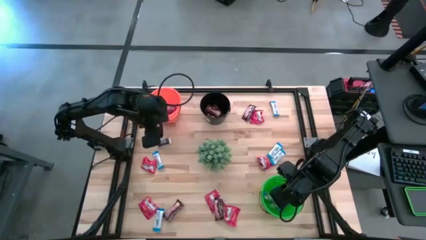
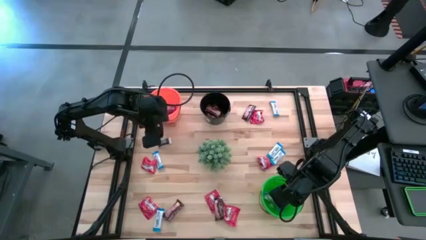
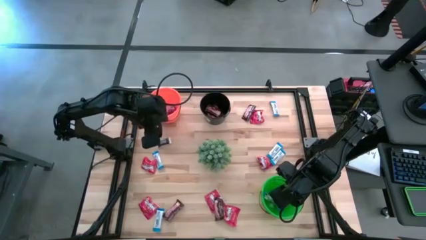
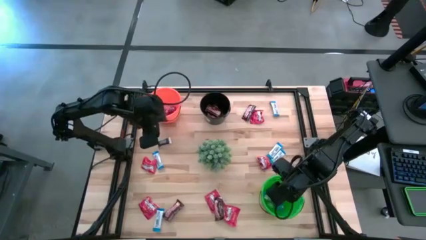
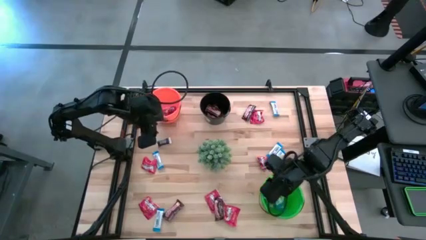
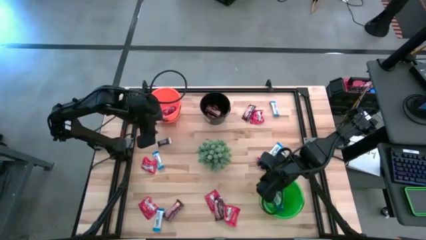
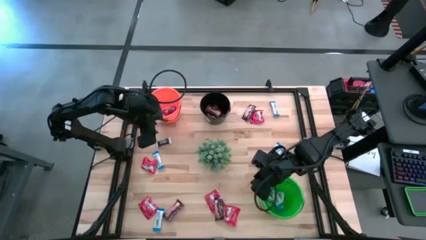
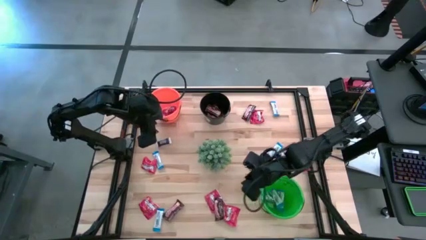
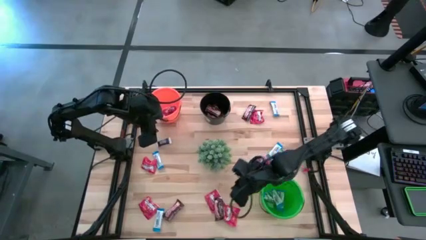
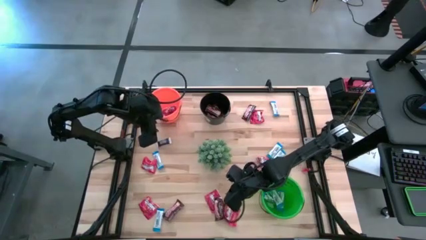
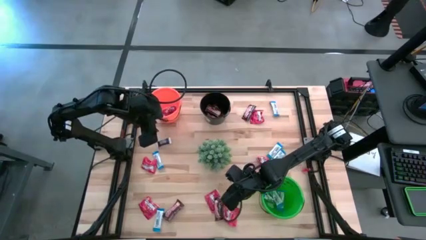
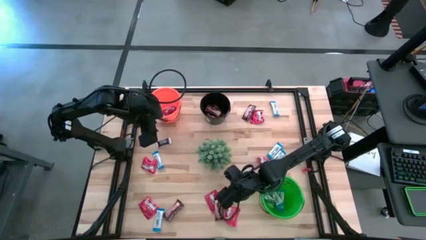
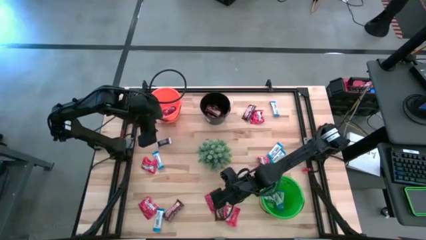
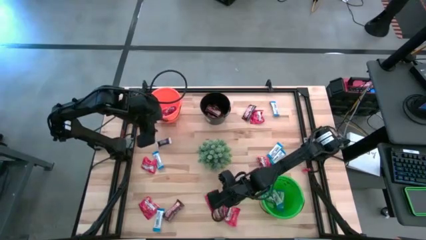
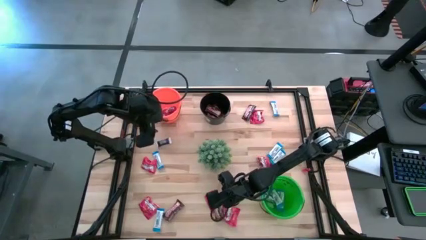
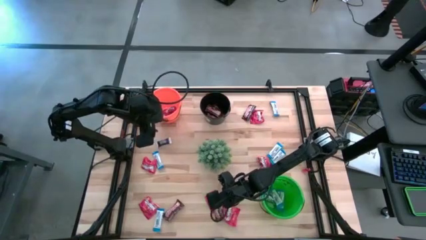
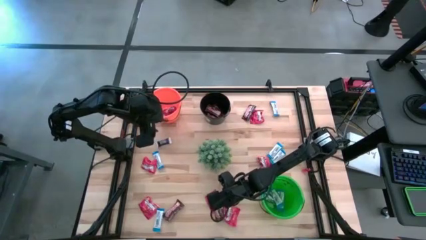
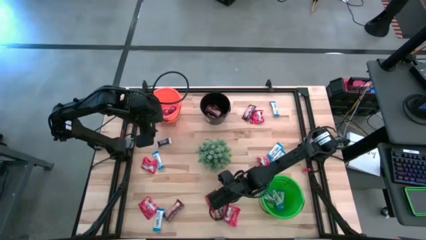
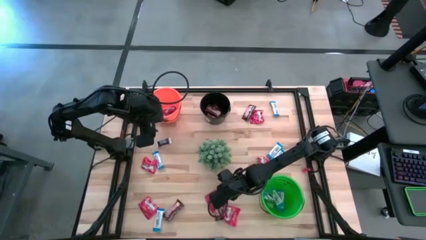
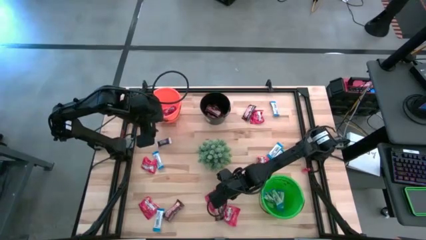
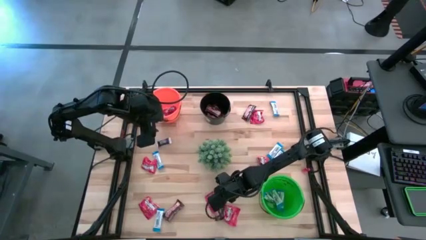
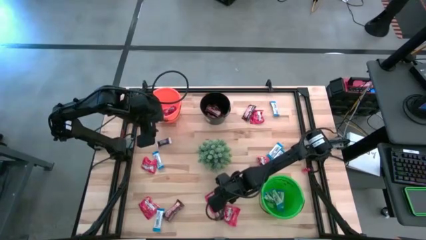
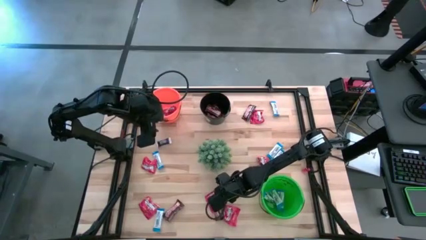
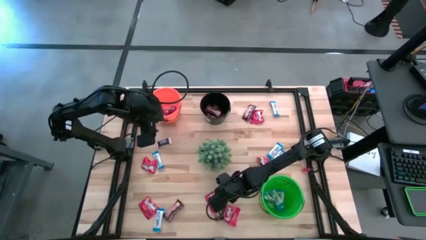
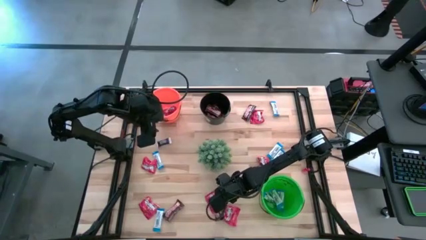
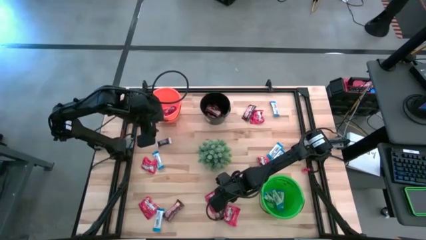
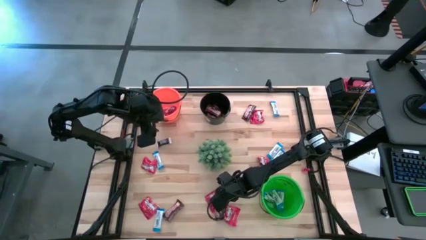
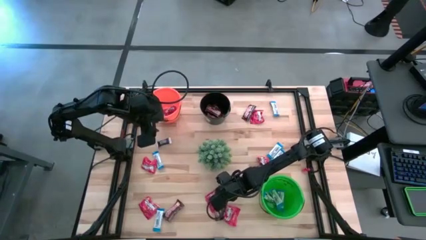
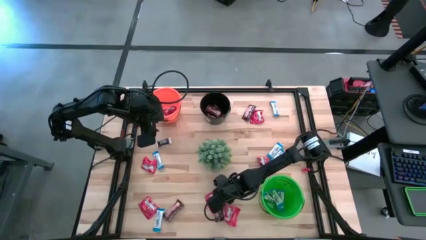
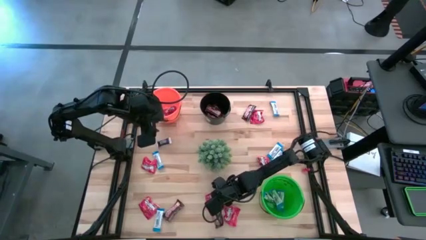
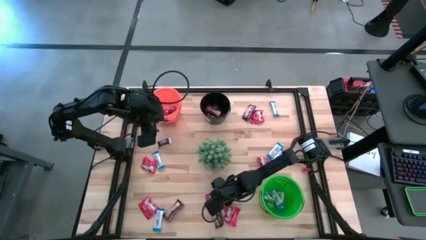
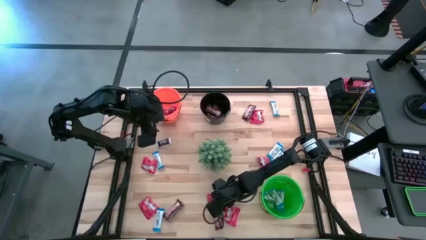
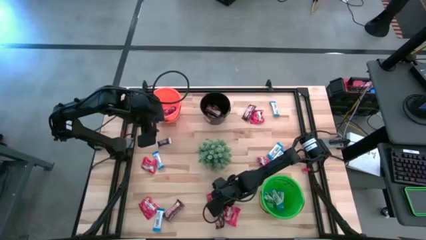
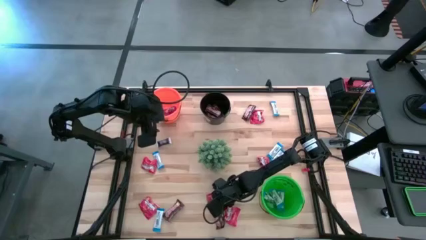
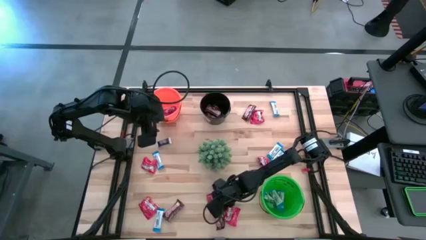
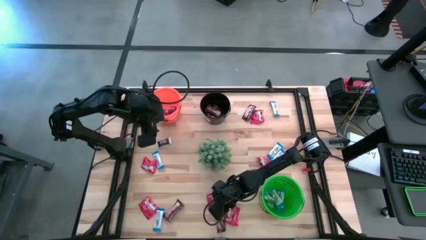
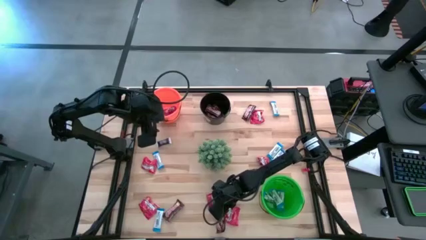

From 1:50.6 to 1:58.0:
Task: Sort candy
Put the brown chocolate into the black bucket

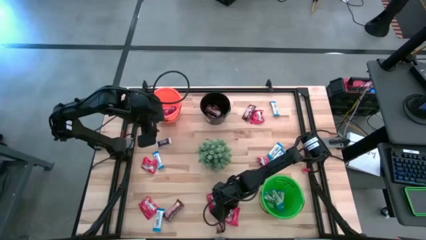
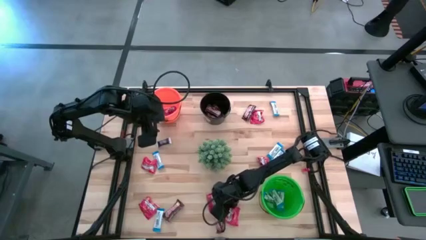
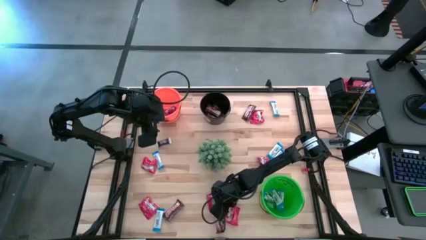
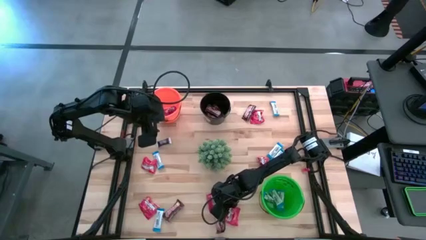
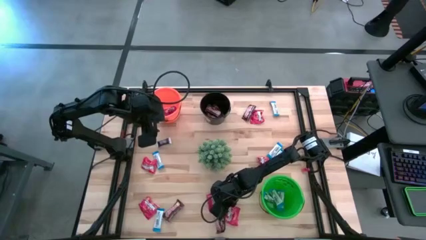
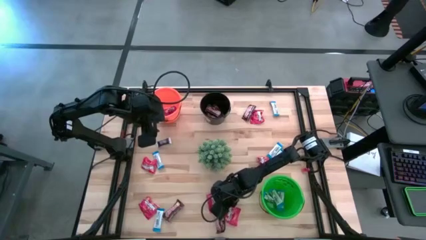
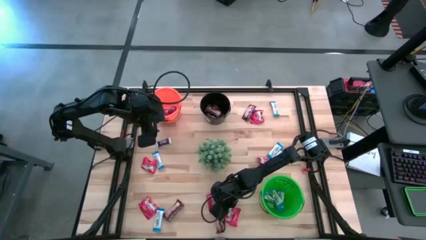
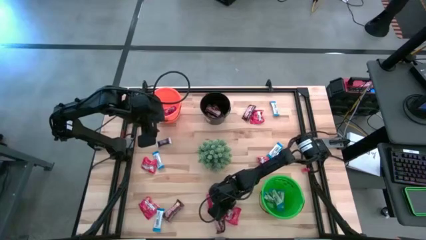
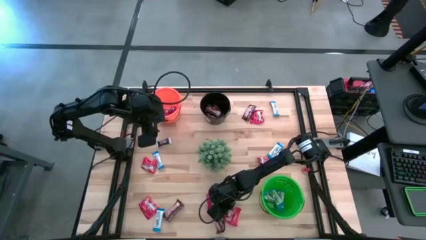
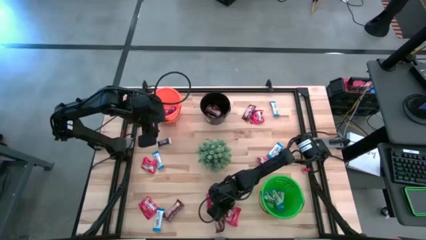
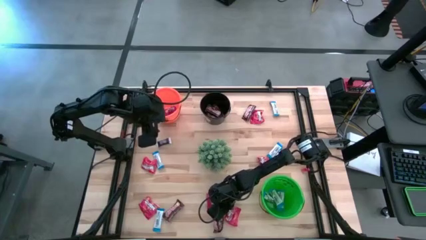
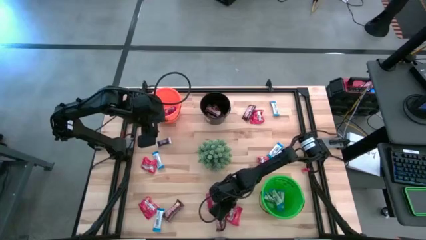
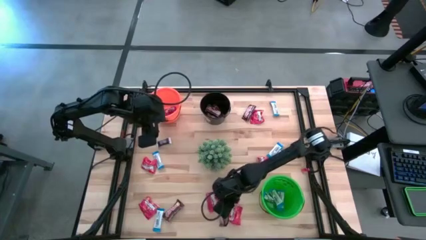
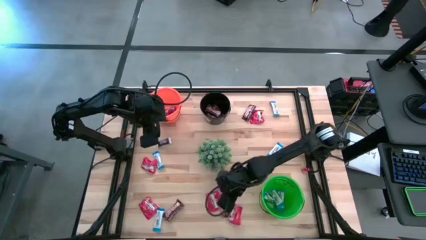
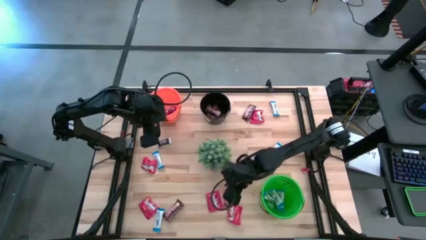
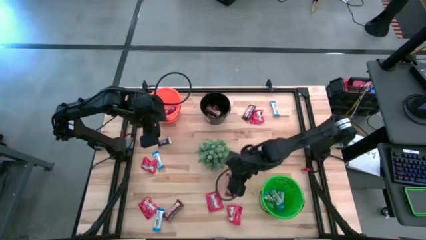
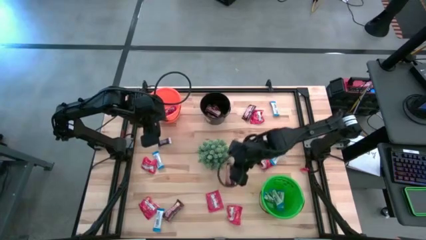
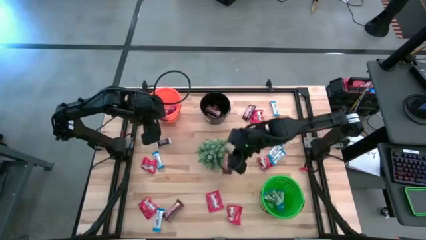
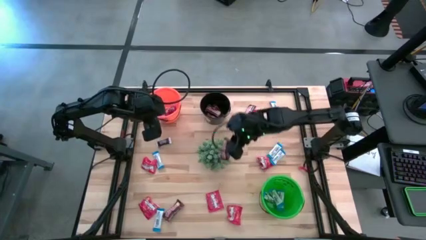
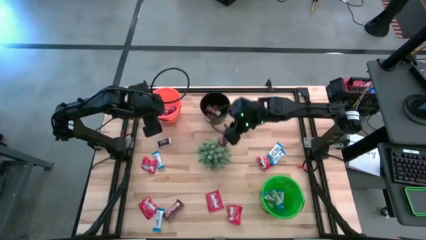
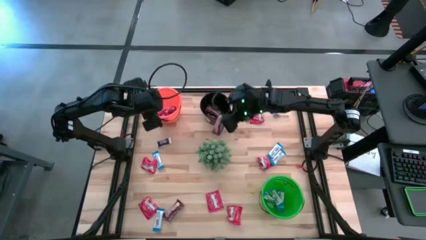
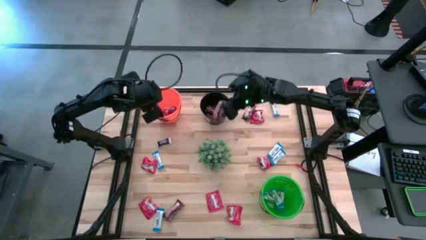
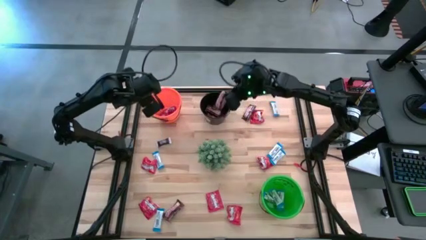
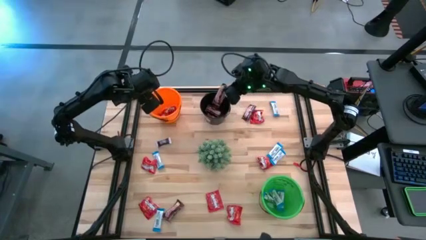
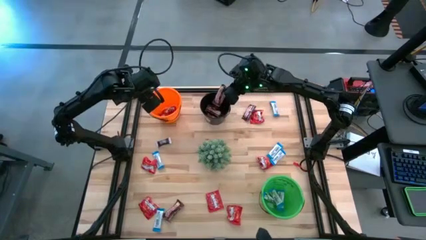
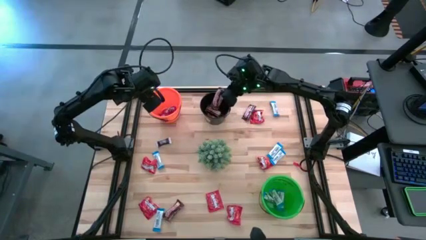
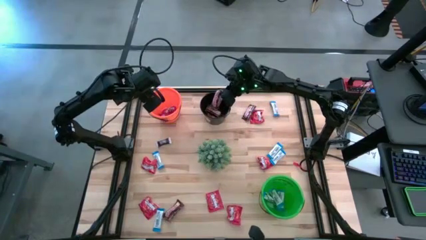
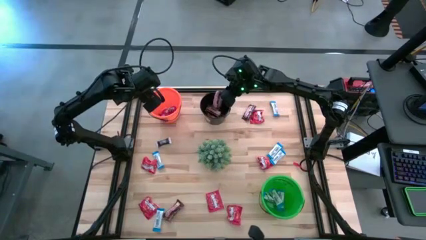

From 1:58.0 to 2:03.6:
Put the brown chocolate into the black bucket

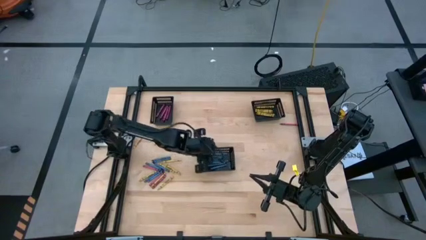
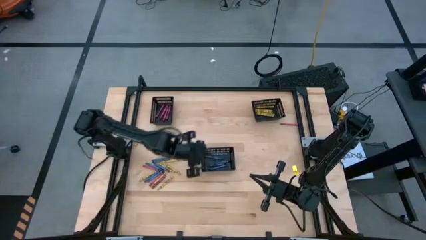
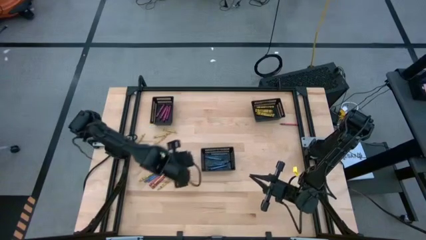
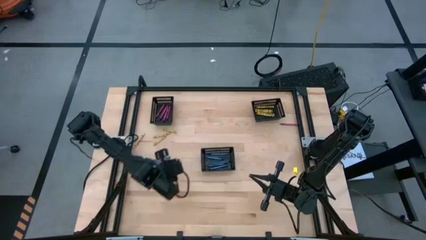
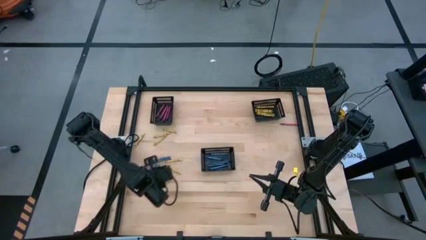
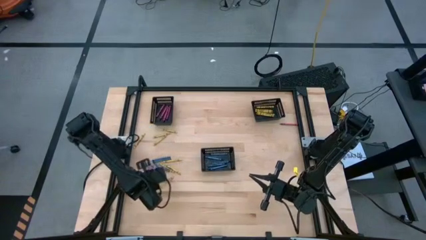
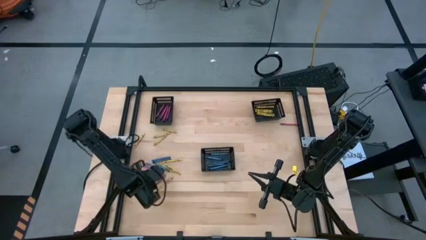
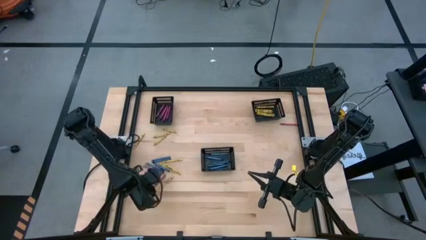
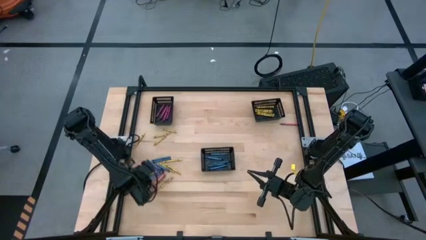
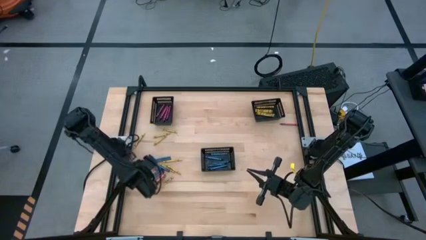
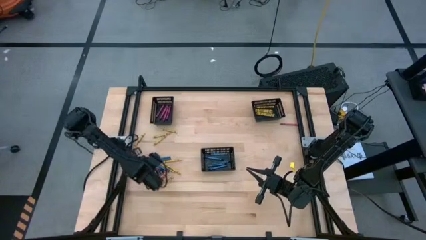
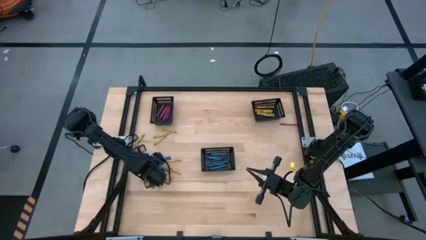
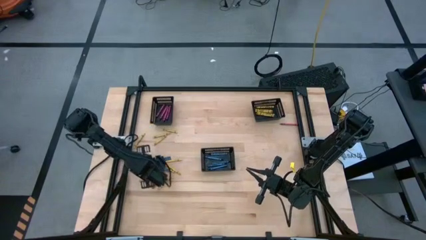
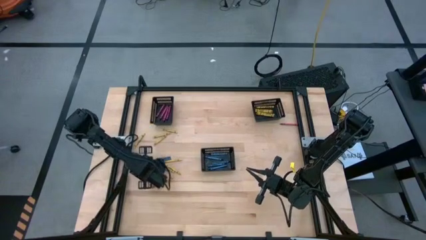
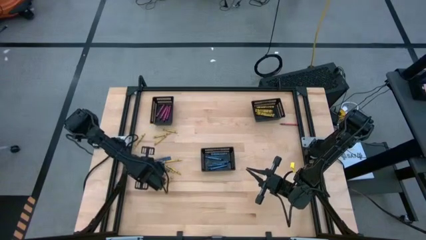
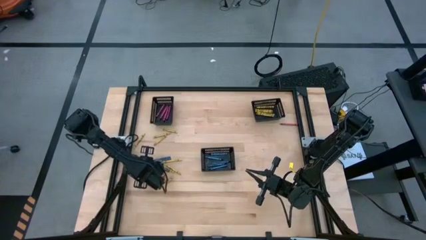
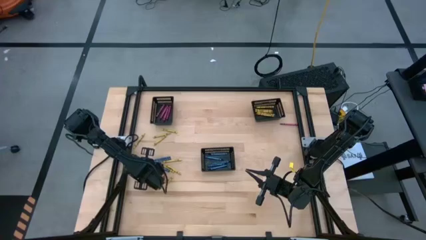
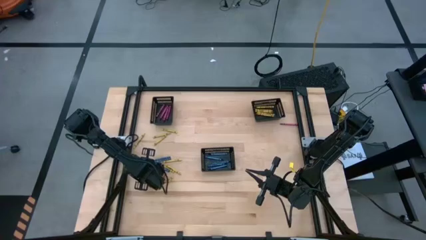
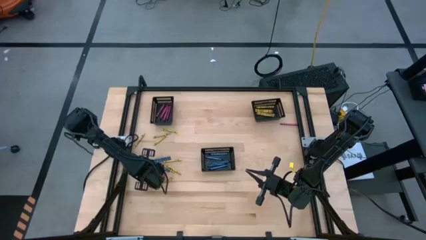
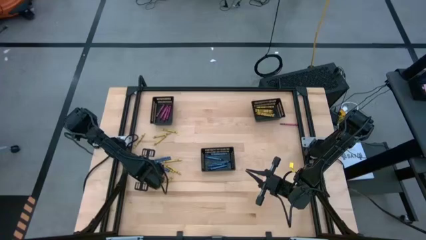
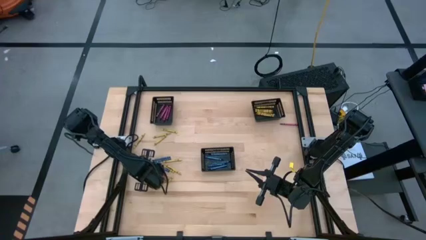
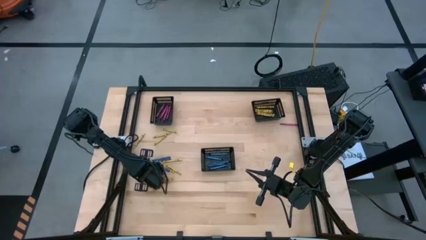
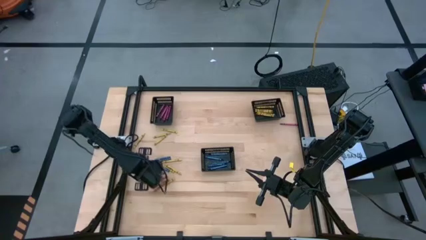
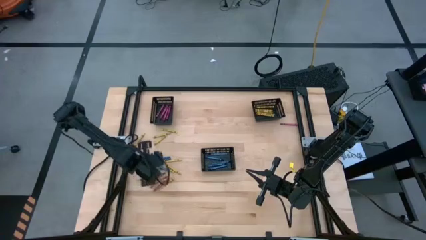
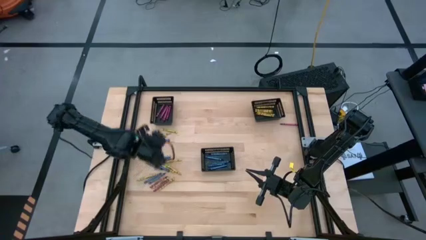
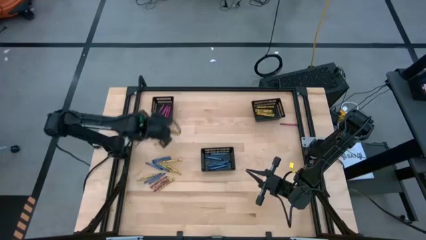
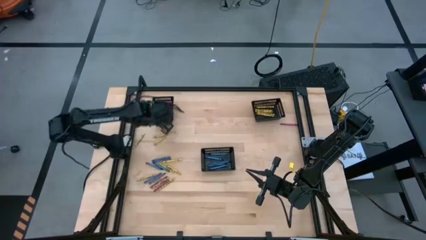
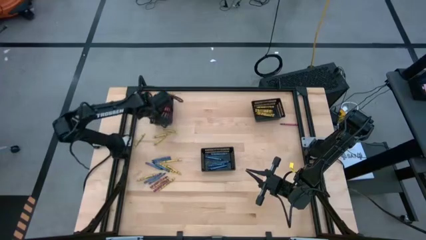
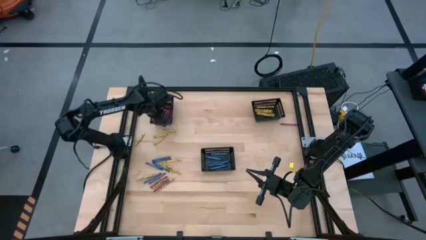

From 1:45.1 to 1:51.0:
Task: Sort crayons
Put the pink crayon into the top left black bin
